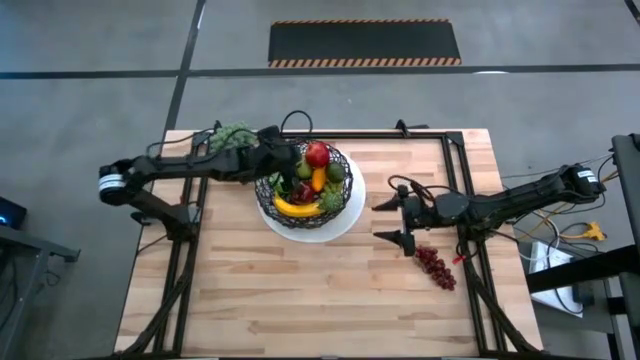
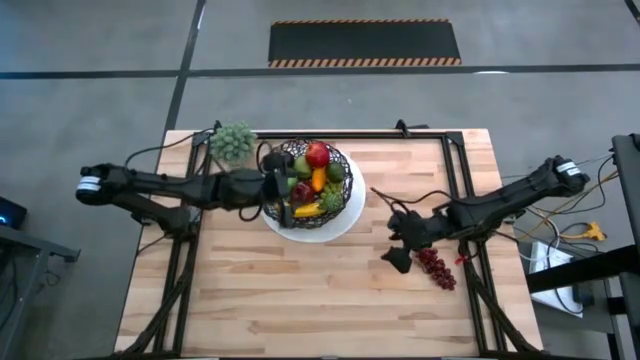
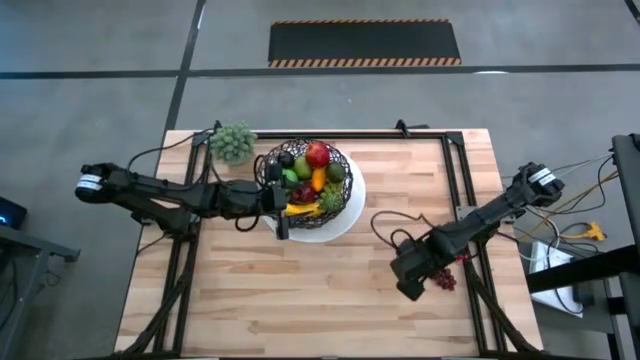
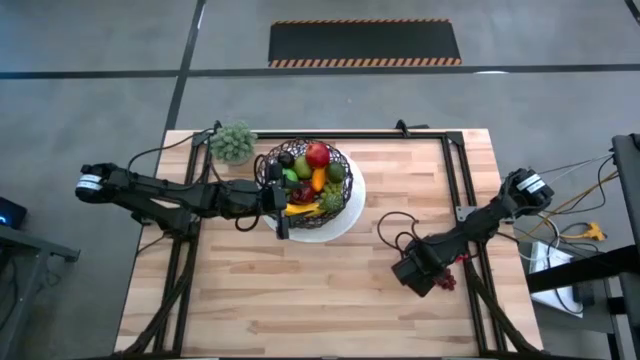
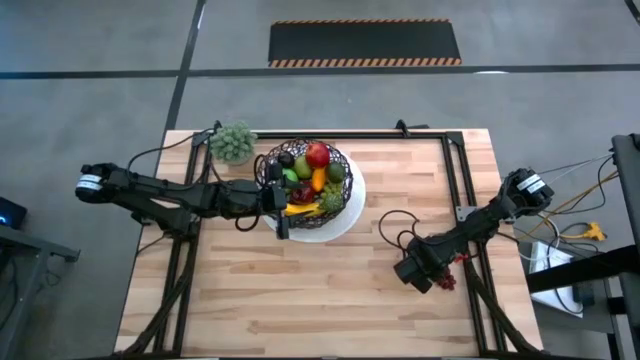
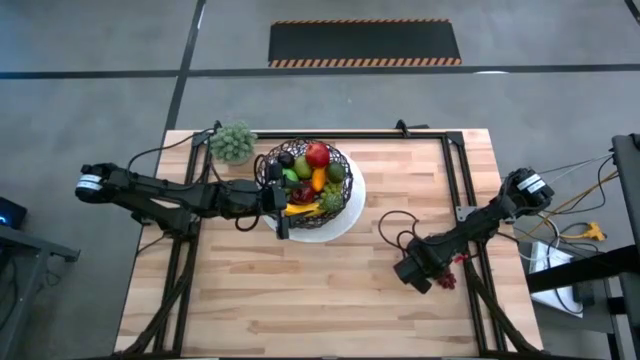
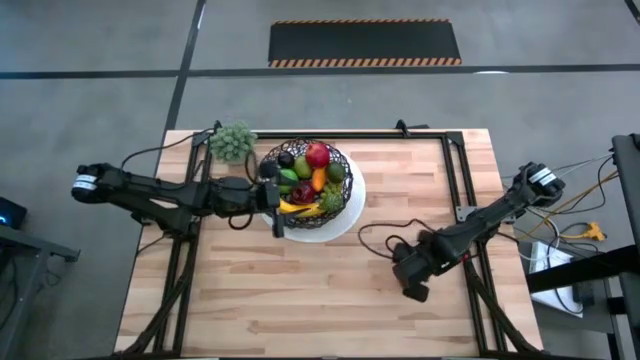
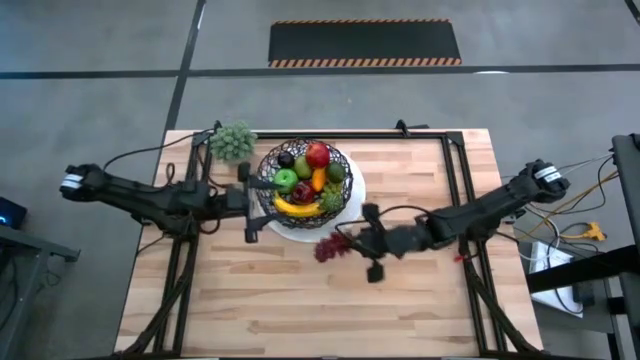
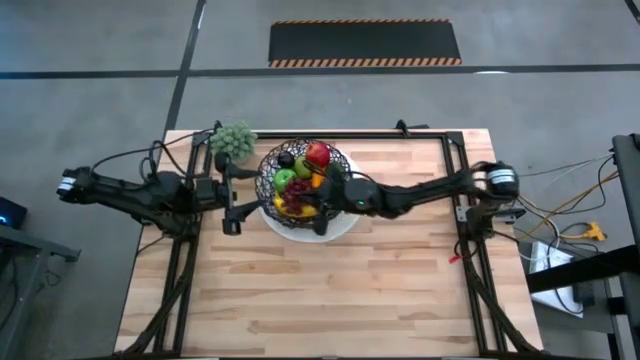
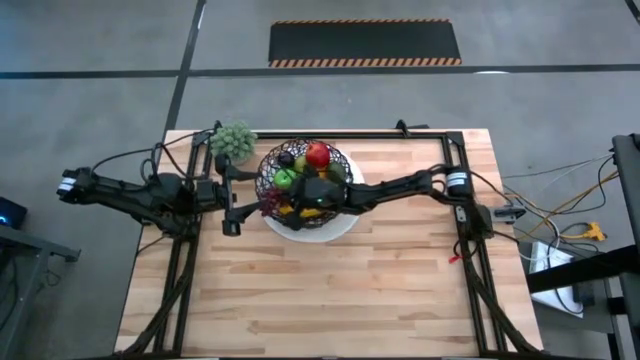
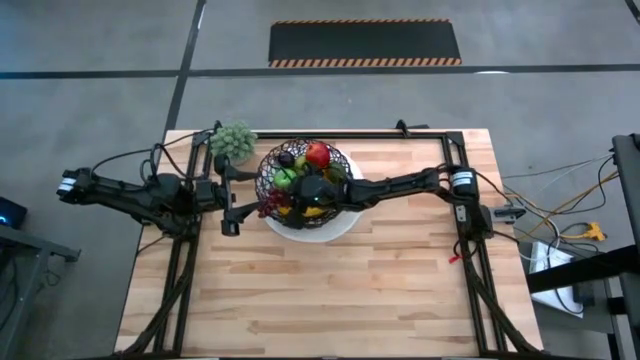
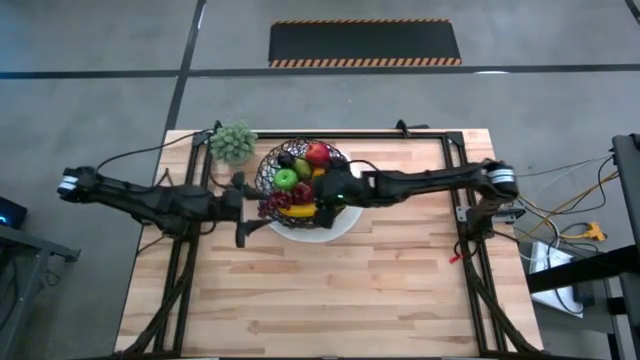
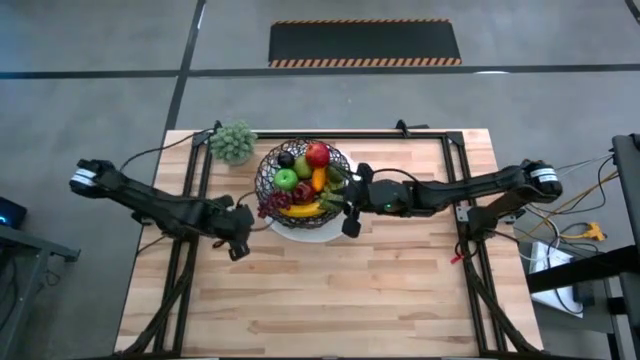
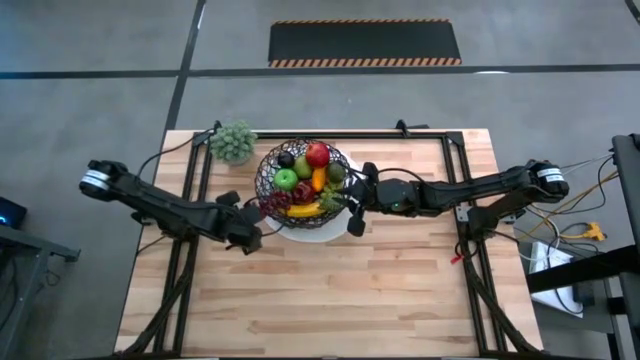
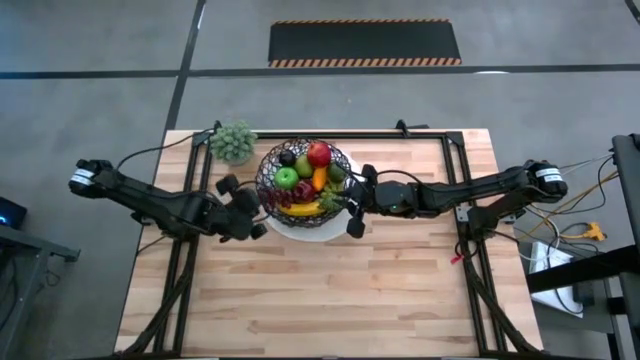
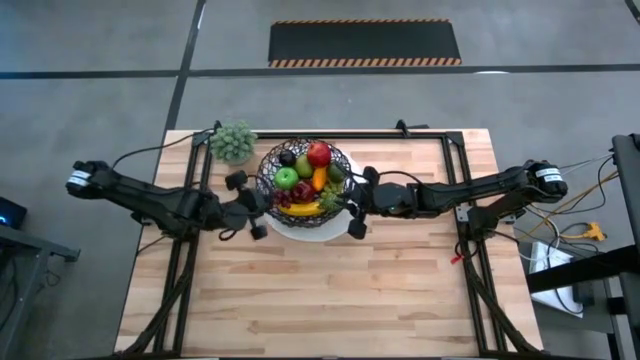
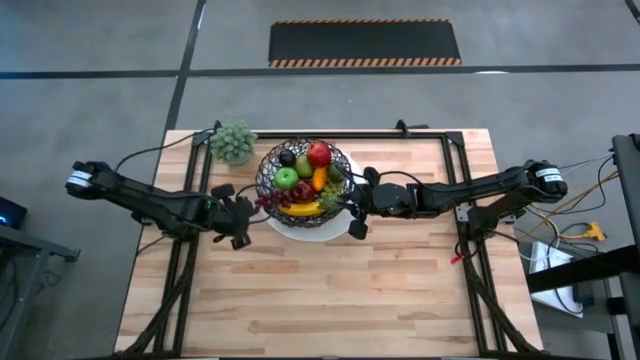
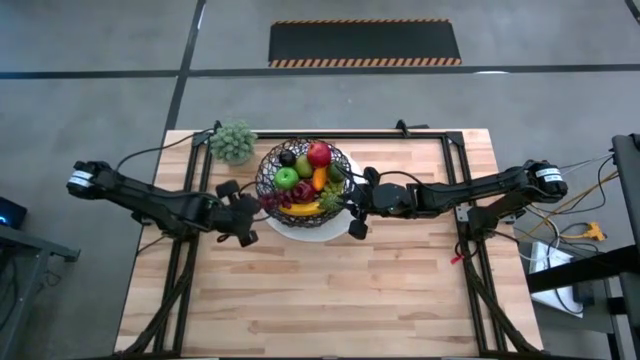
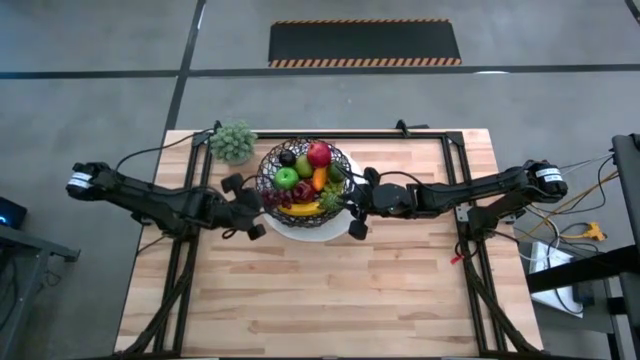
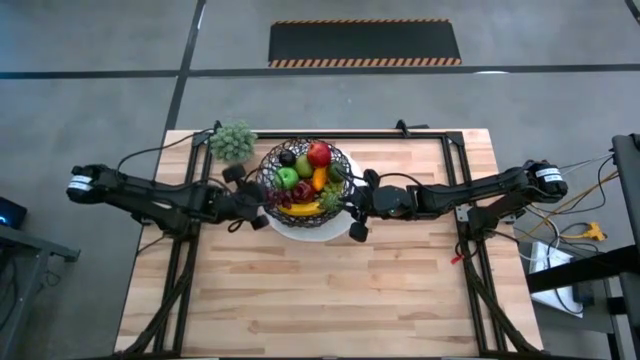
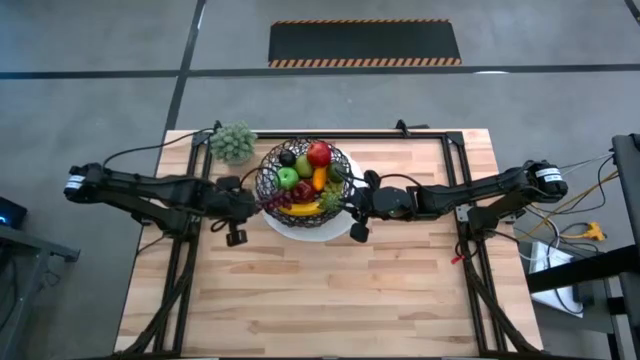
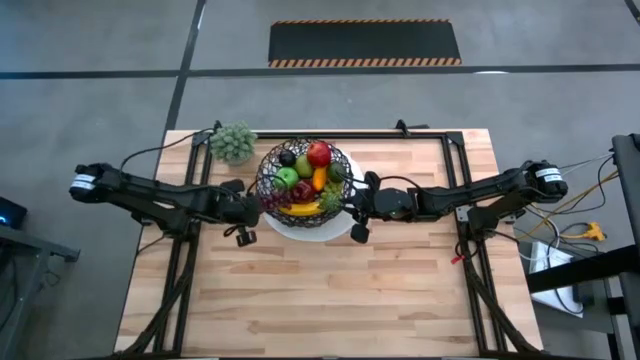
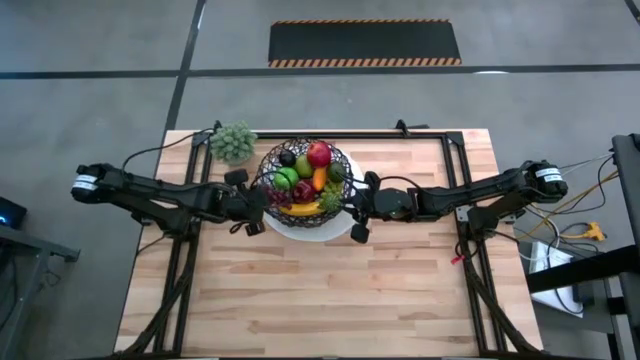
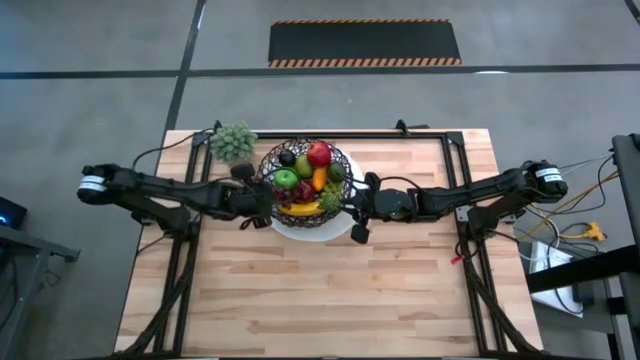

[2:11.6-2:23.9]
Task: Build produce basket
Put the red grapes into the wire basket

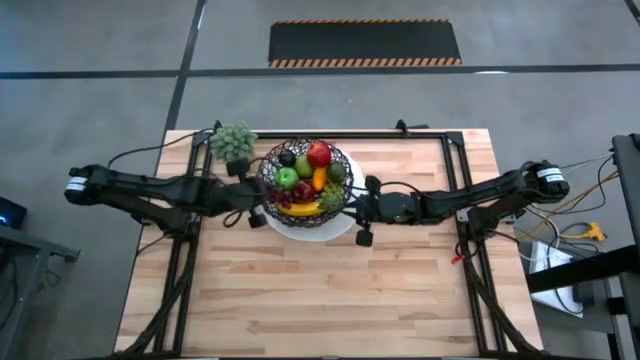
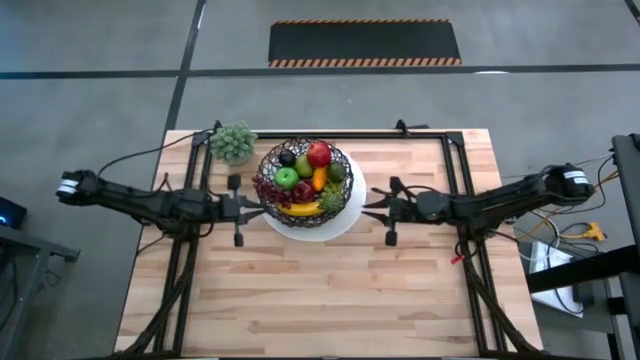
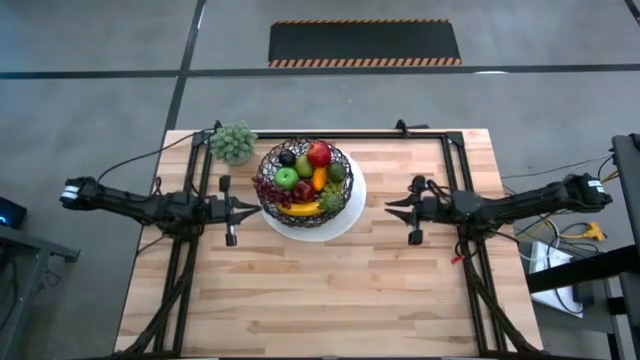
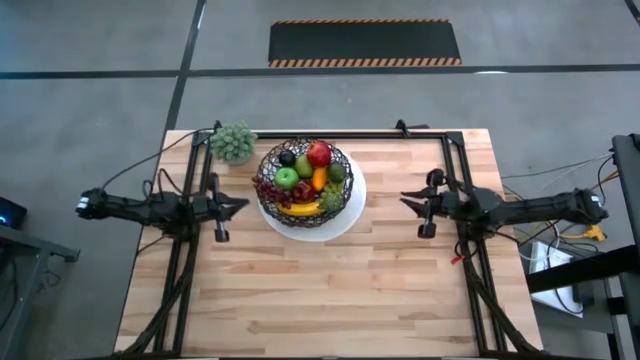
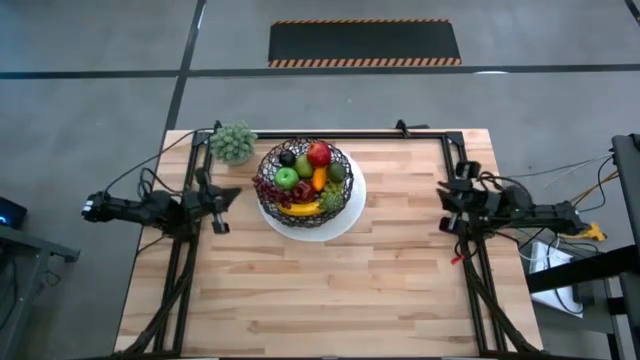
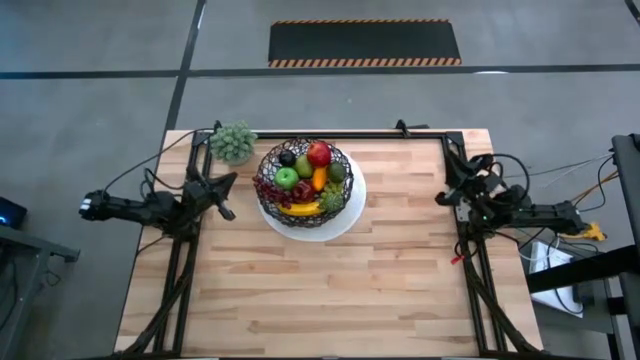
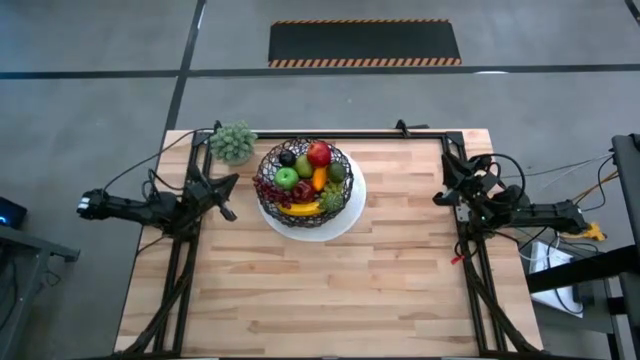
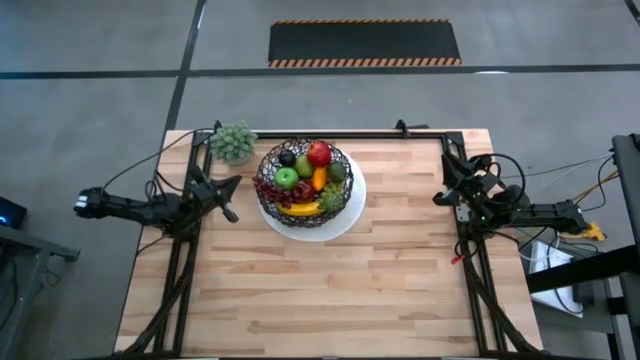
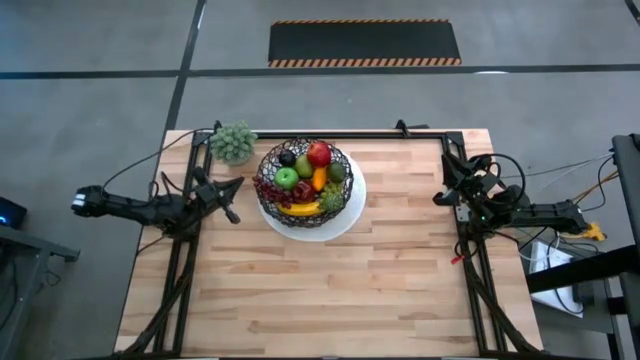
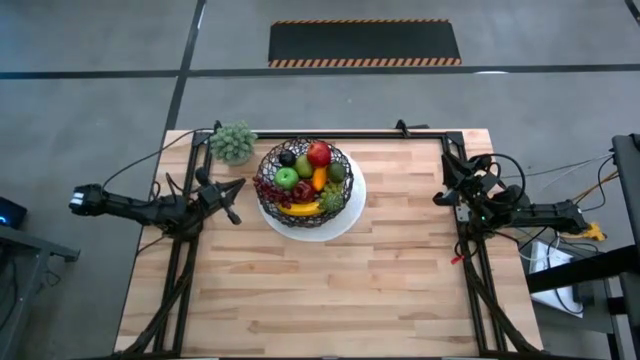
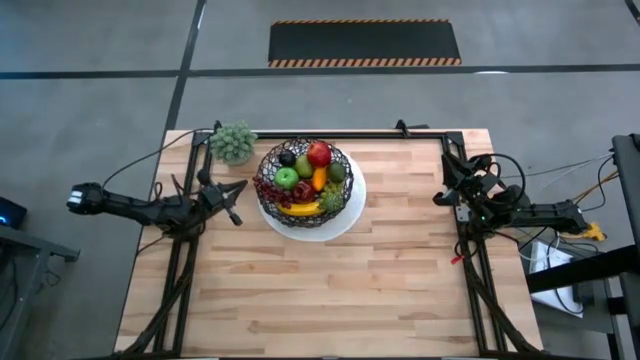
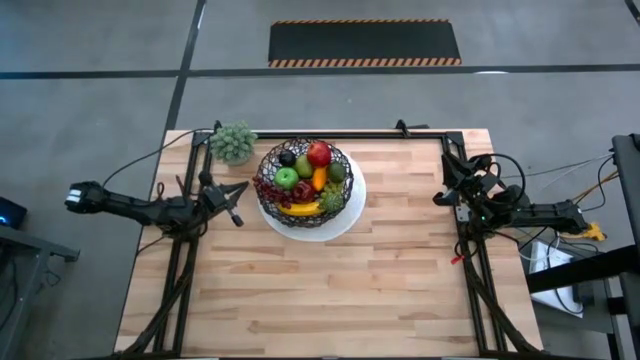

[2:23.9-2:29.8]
Return to Home Position

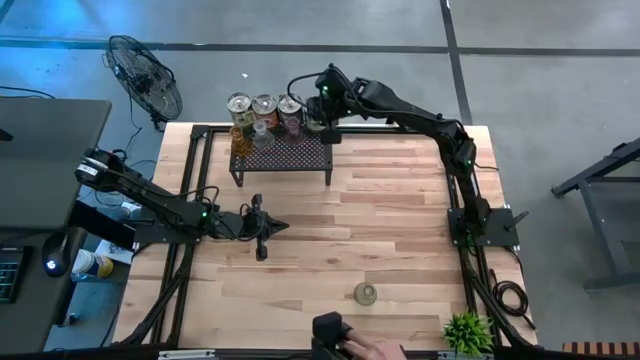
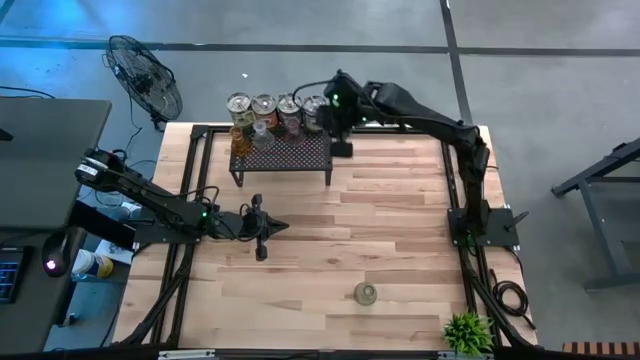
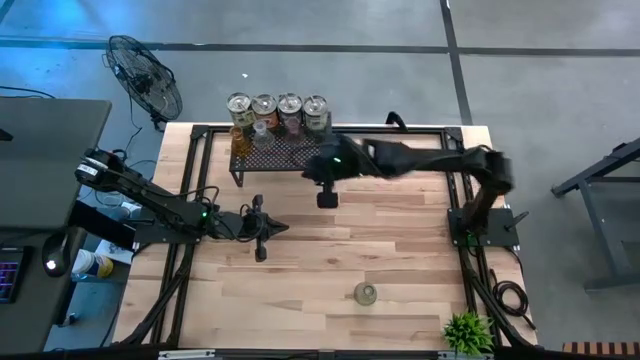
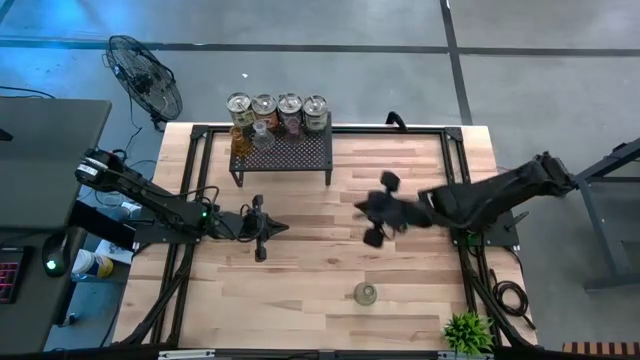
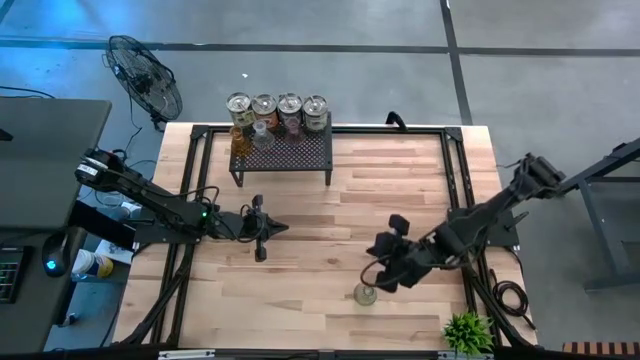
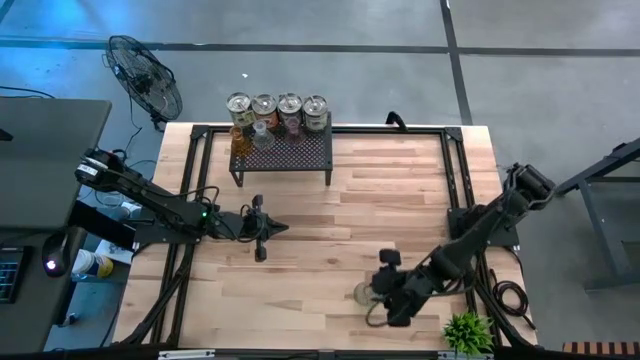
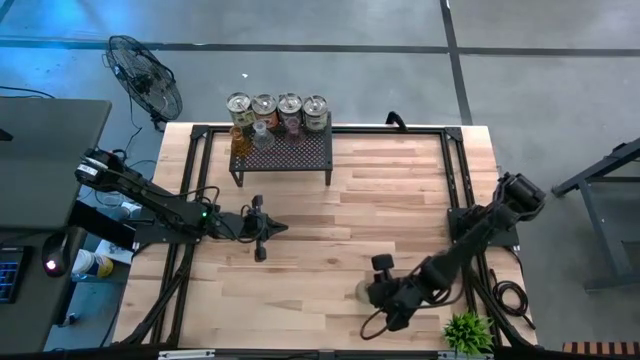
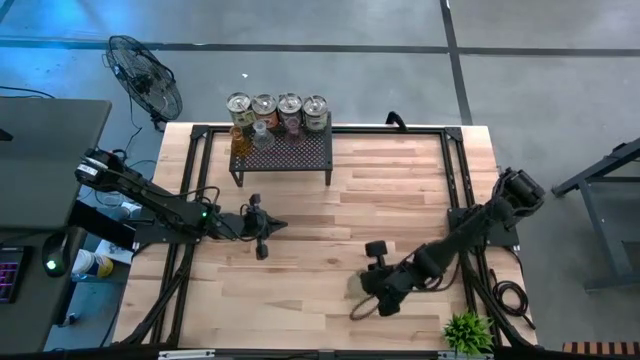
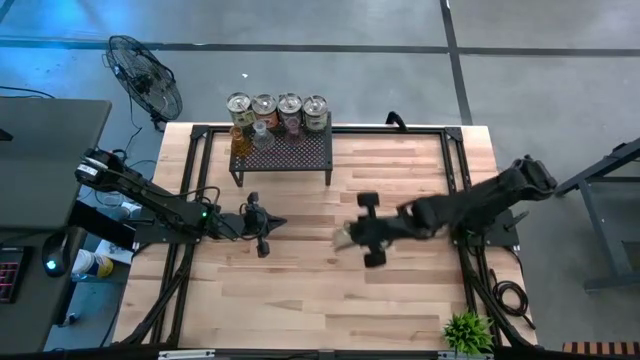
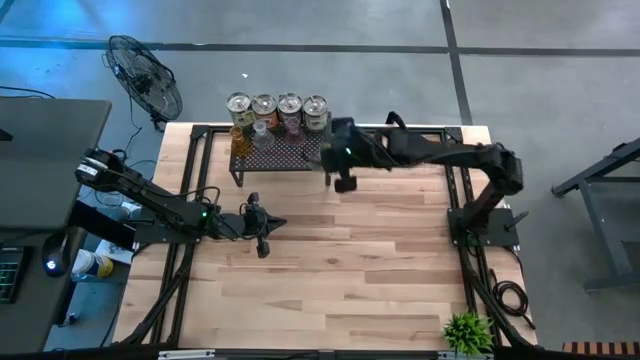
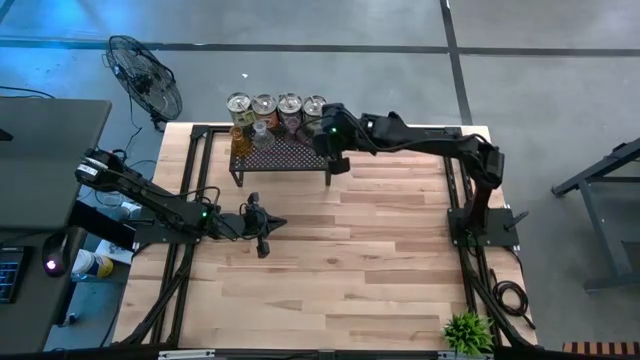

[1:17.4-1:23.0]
Task: Pick & Place candle stick holders
Put the blue candle holder on the shelf aligned with the green scented candle
